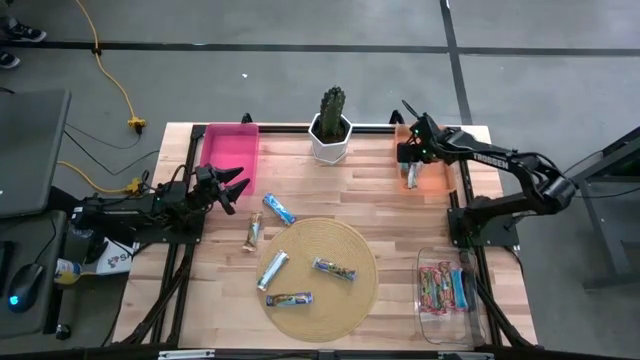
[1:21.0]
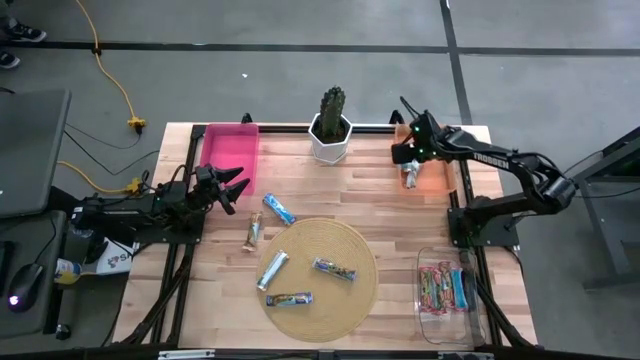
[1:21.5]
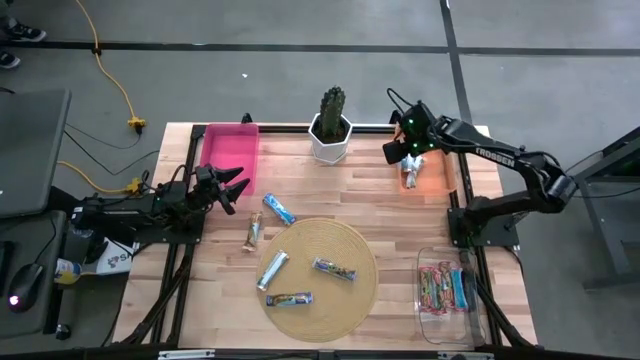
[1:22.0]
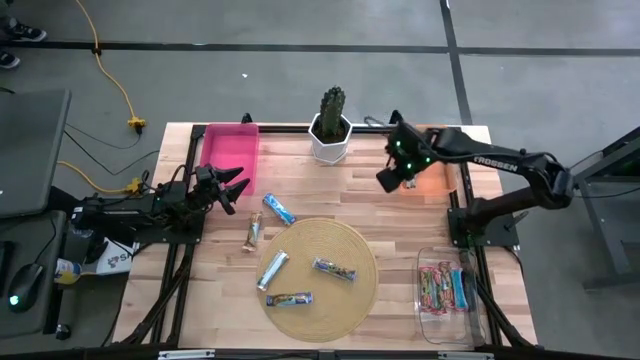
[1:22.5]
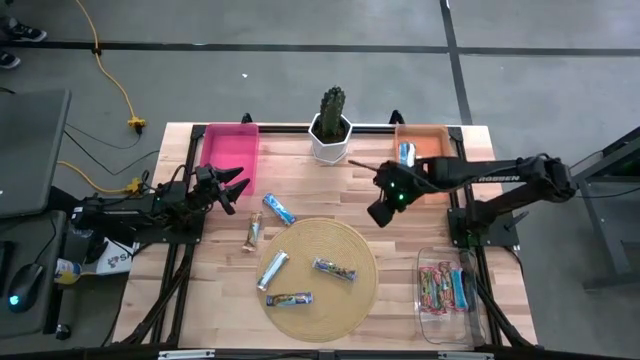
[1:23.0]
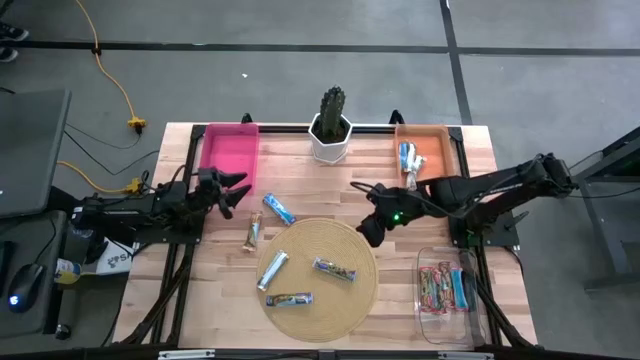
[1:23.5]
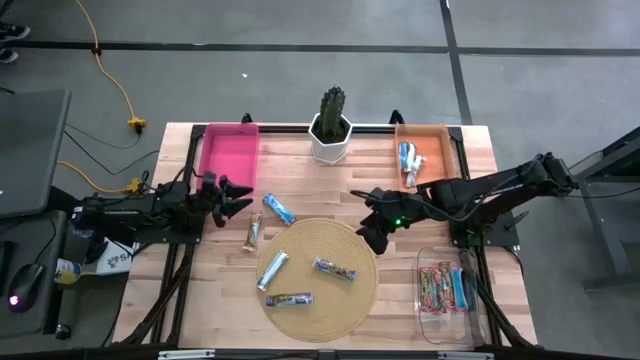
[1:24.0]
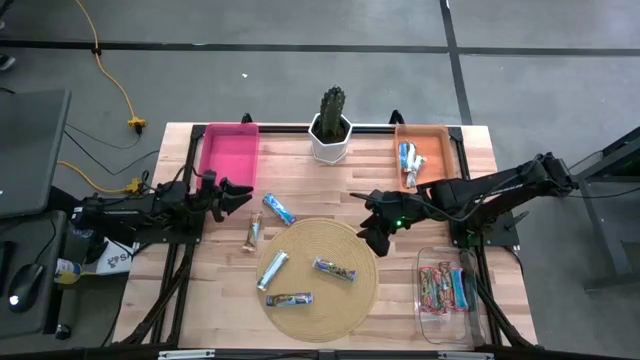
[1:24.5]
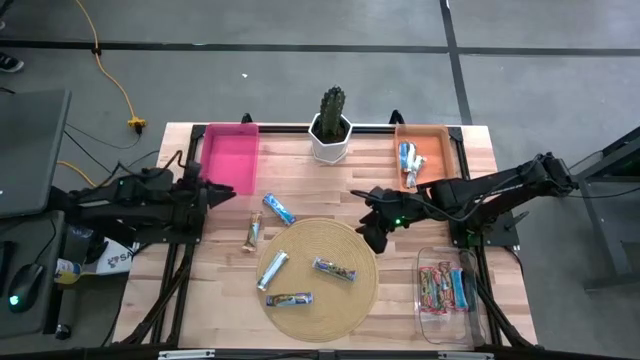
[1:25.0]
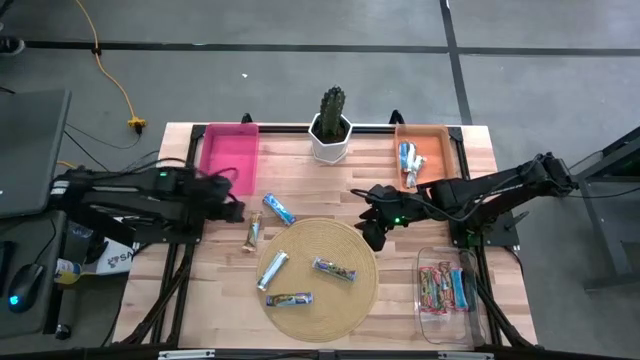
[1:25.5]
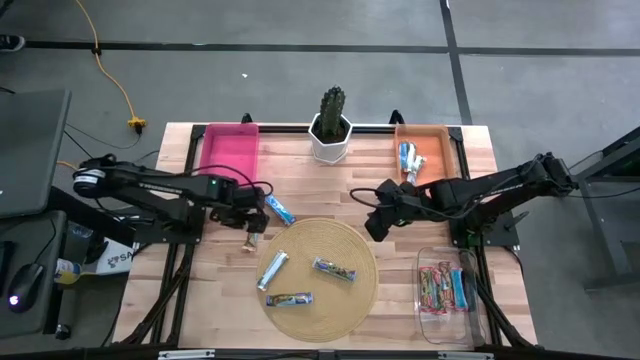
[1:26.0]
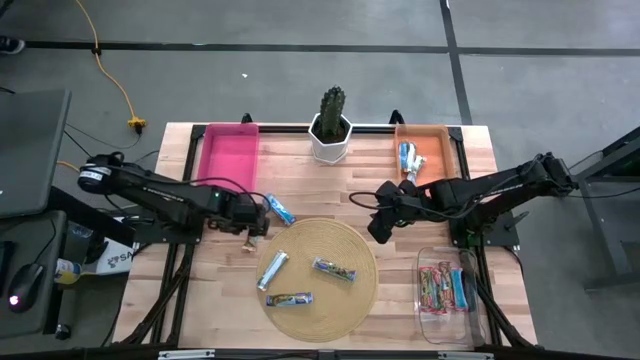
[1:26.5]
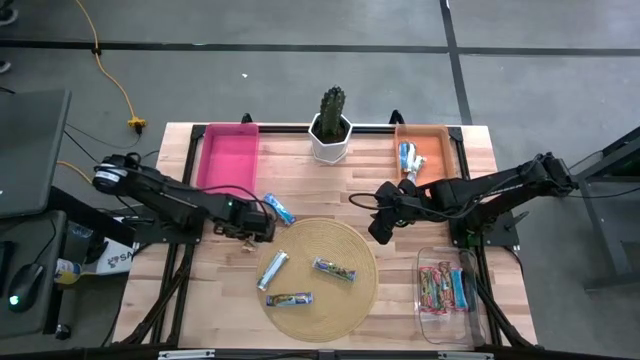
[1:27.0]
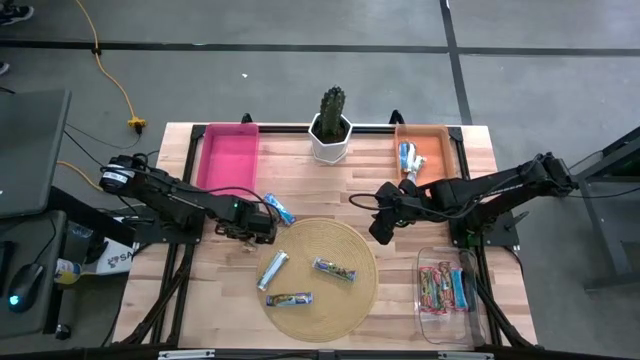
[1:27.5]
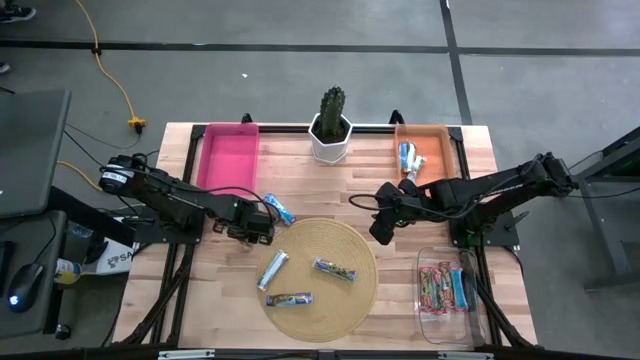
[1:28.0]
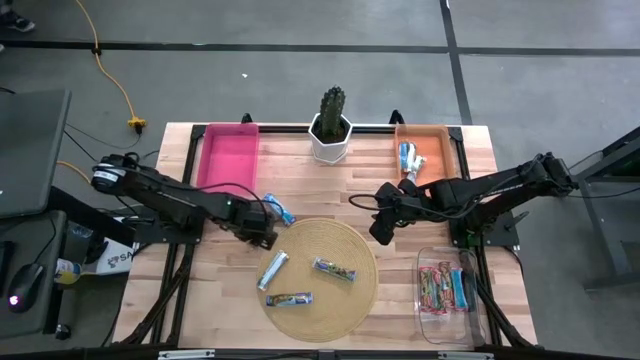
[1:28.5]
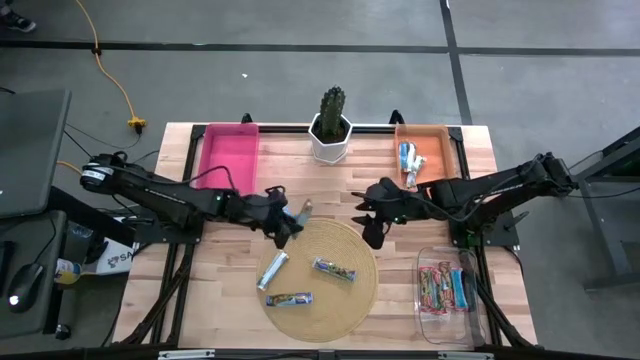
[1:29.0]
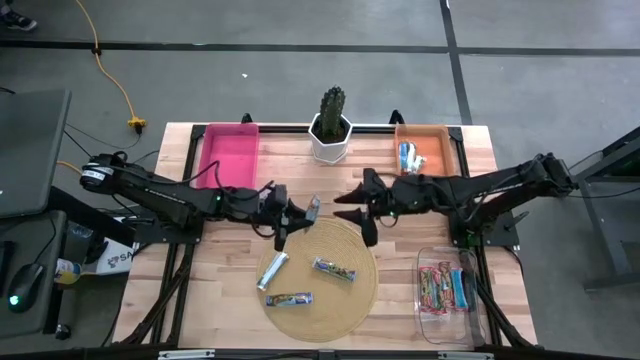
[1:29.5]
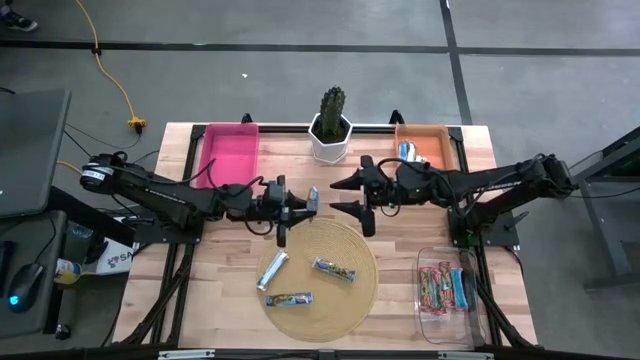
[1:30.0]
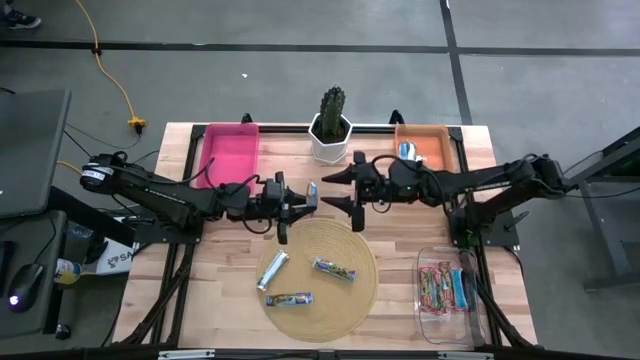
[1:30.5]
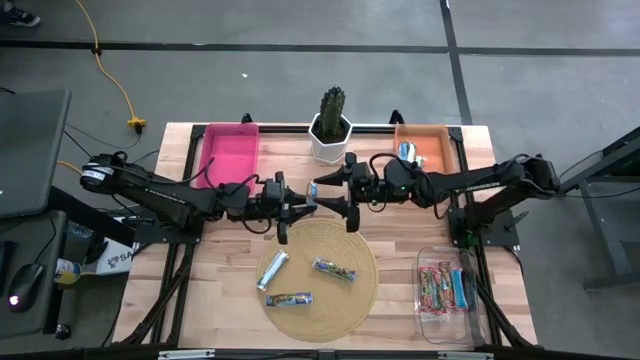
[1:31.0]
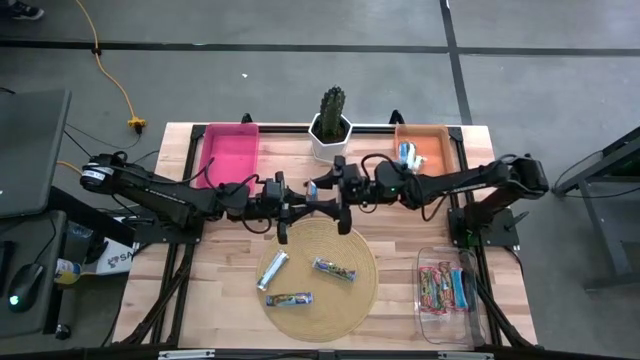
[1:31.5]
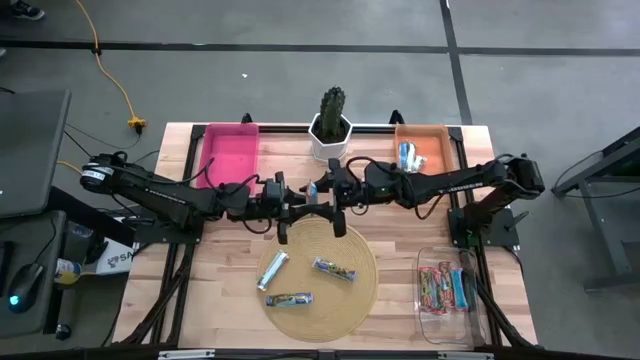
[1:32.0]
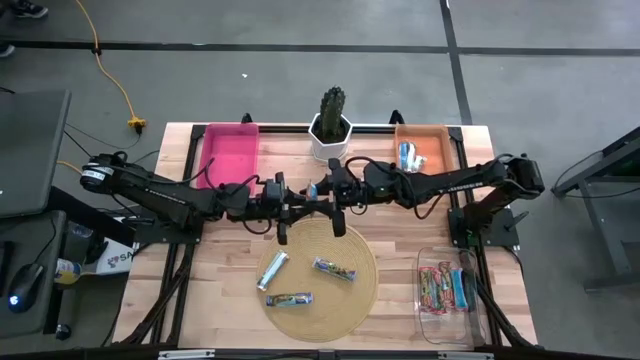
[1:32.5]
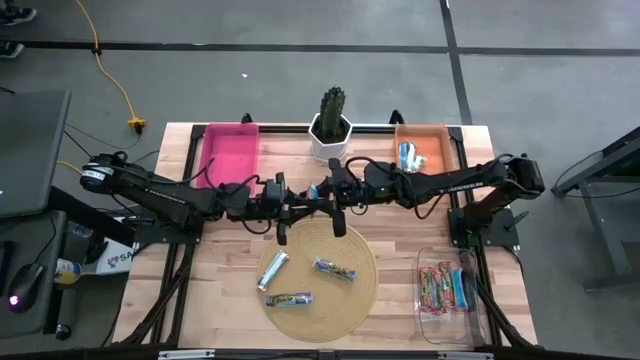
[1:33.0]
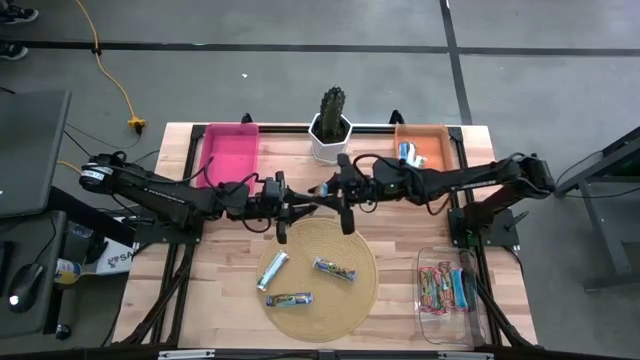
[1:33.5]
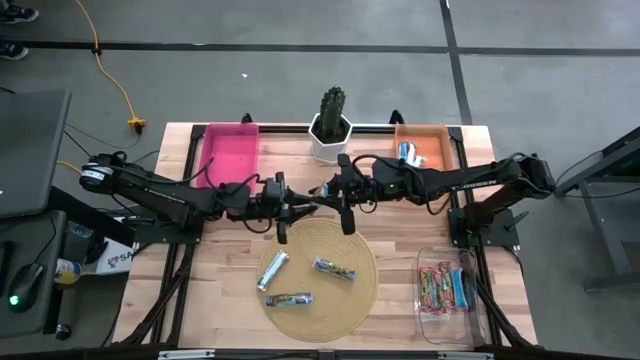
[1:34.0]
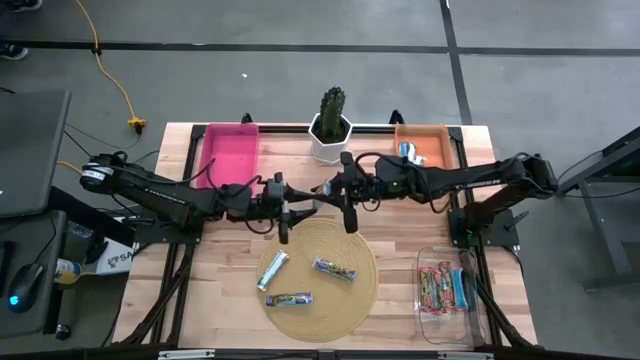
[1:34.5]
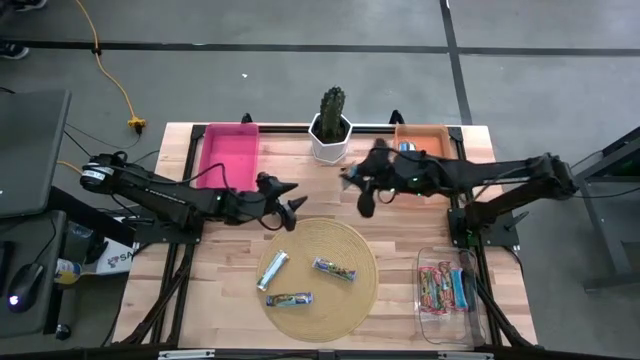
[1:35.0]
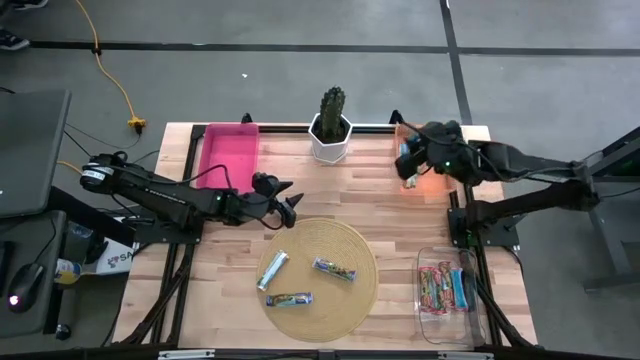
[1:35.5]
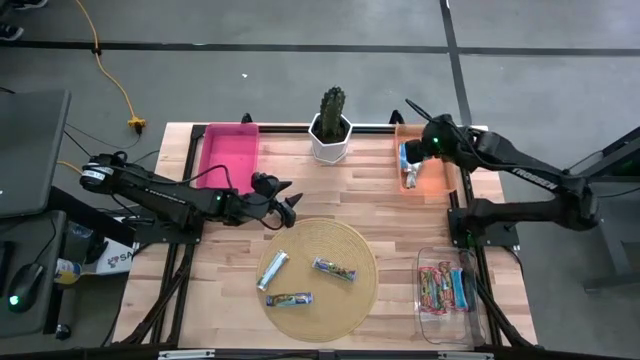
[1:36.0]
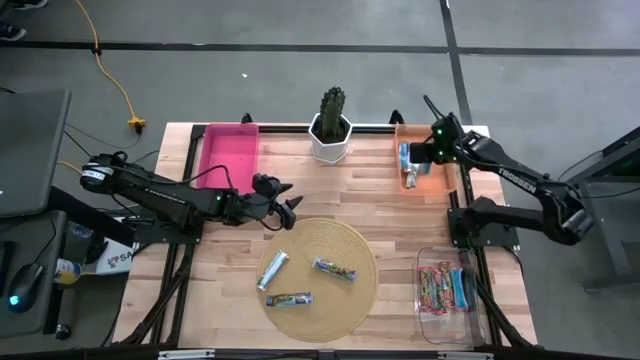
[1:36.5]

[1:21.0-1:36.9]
Task: Pick and place Granola Bars by type
Put the yellow granola bar into the orange bin

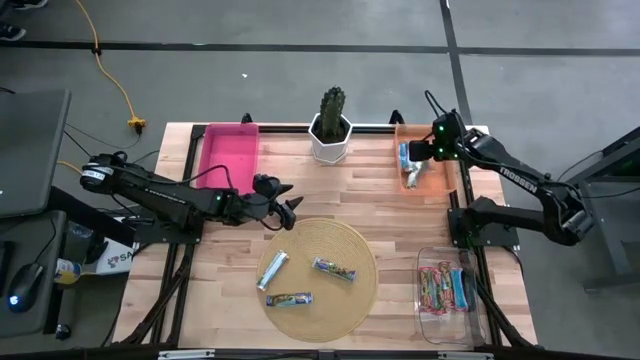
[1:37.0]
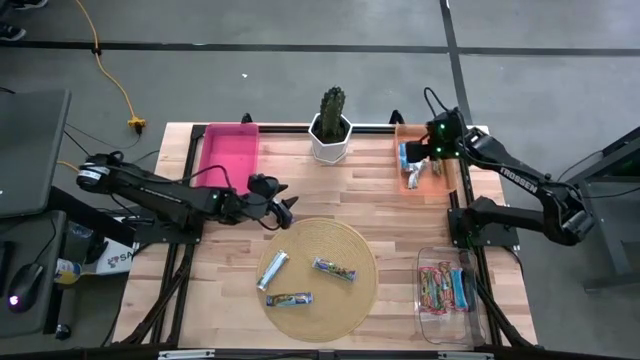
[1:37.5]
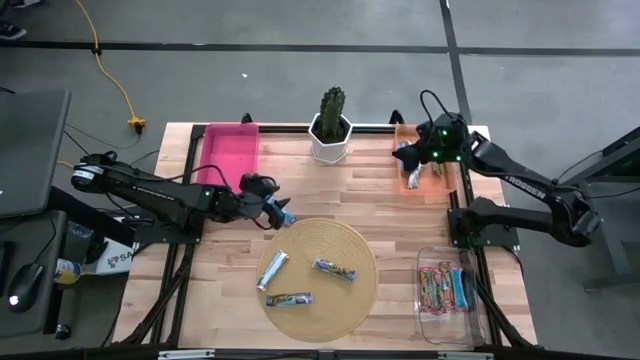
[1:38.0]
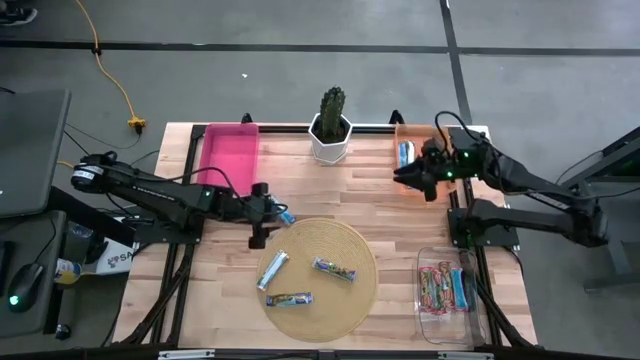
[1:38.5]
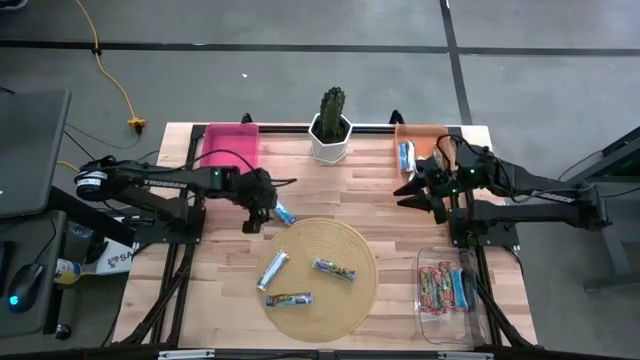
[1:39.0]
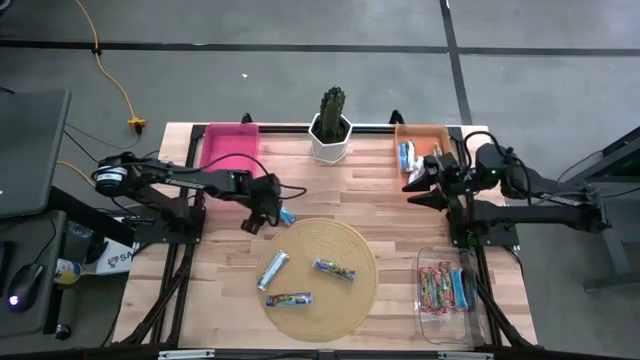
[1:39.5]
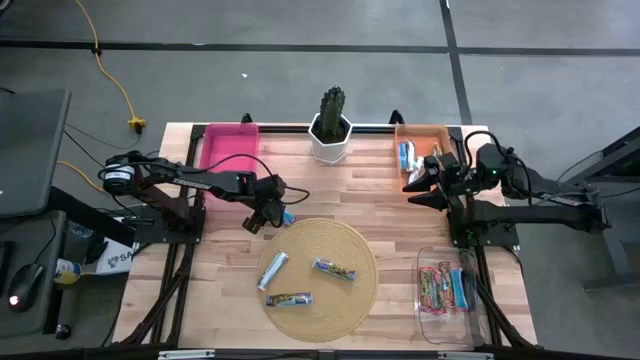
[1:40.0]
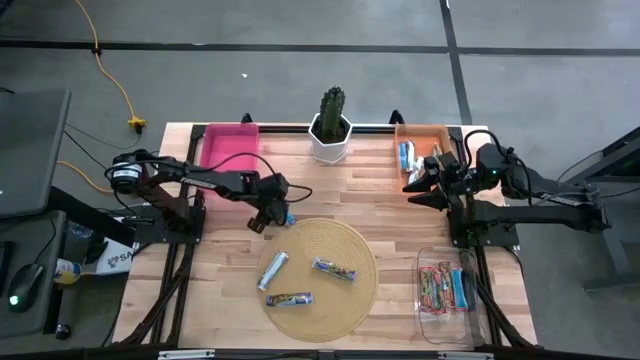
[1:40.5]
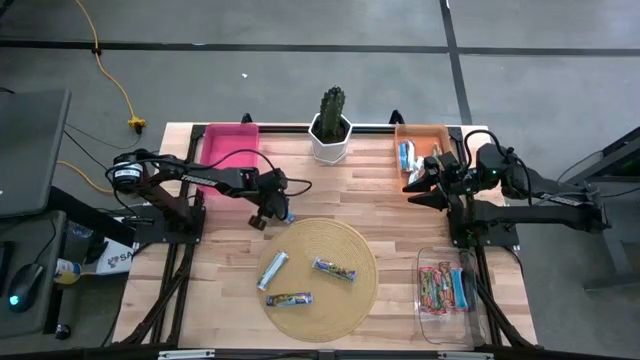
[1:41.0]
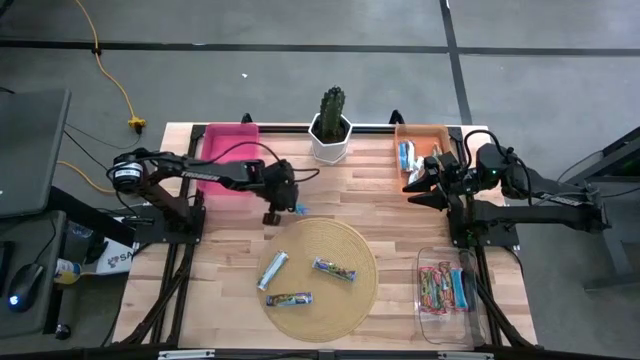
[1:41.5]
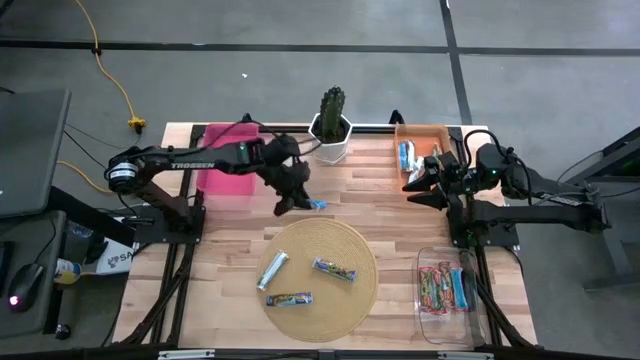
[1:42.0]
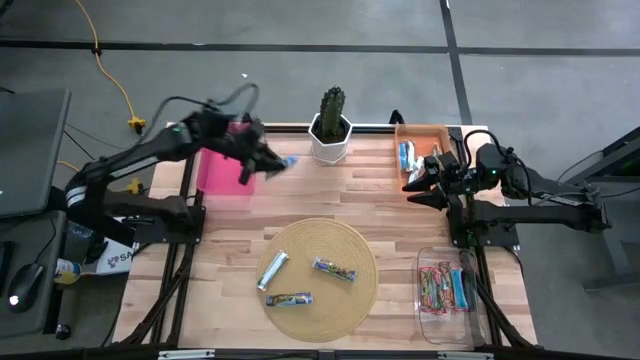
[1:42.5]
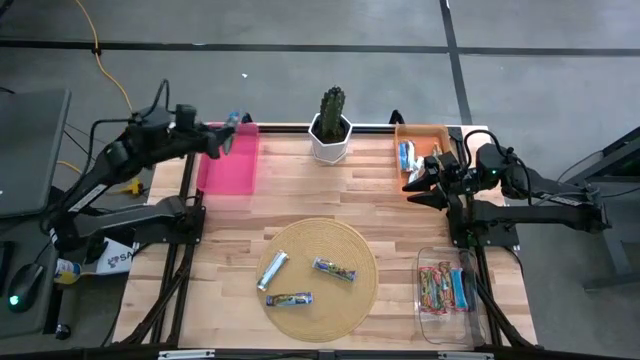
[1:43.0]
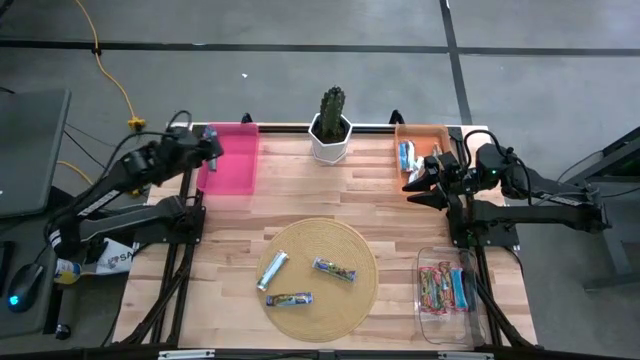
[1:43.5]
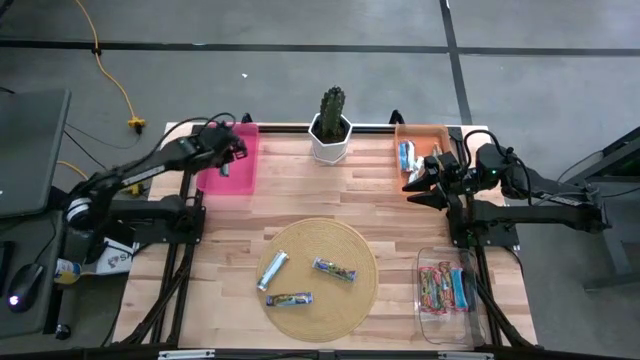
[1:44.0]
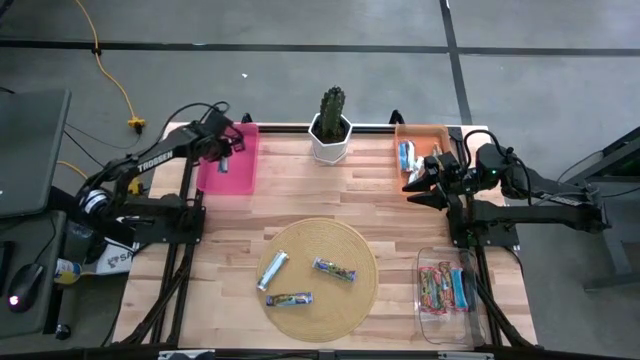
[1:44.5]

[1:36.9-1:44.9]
Put the blue granola bar into the red bin
